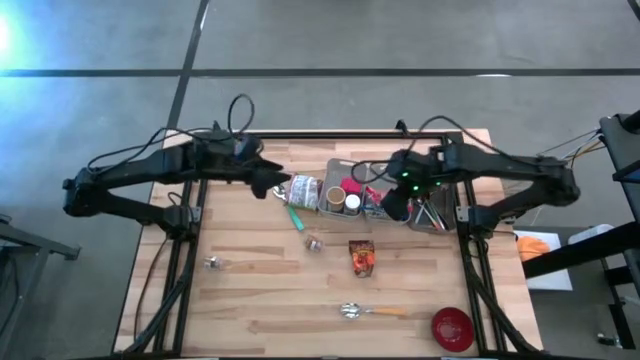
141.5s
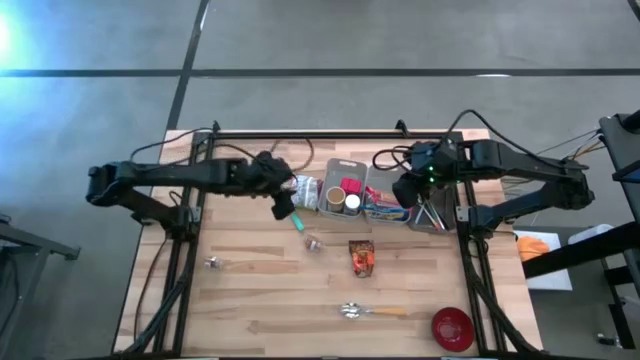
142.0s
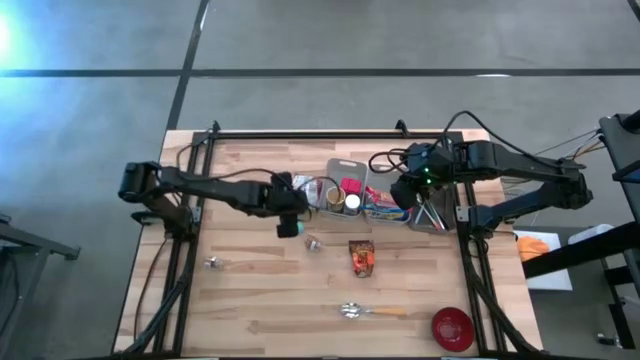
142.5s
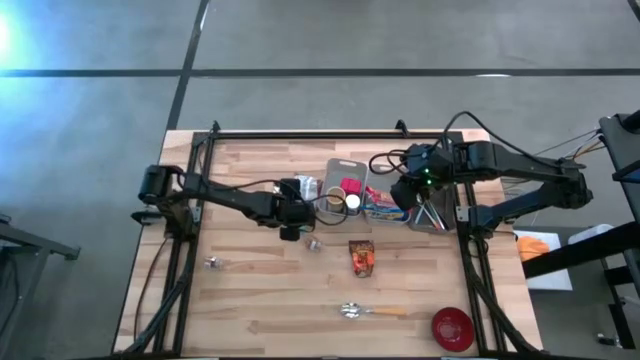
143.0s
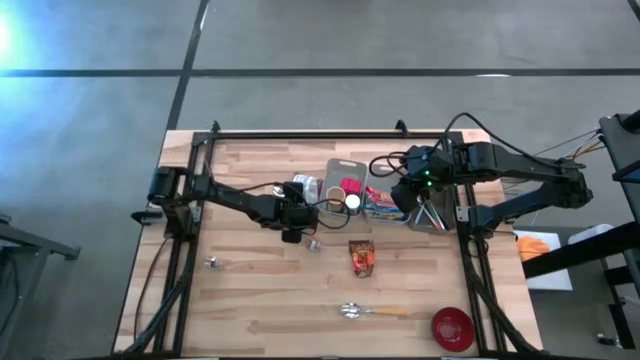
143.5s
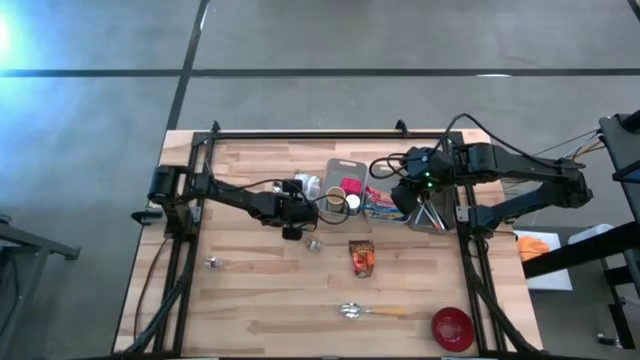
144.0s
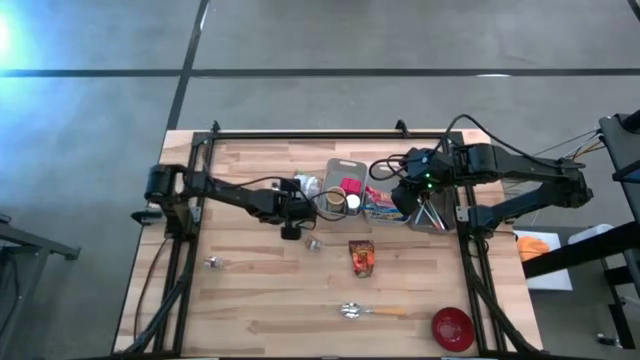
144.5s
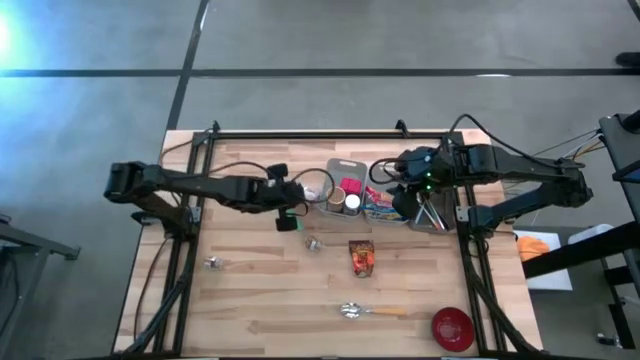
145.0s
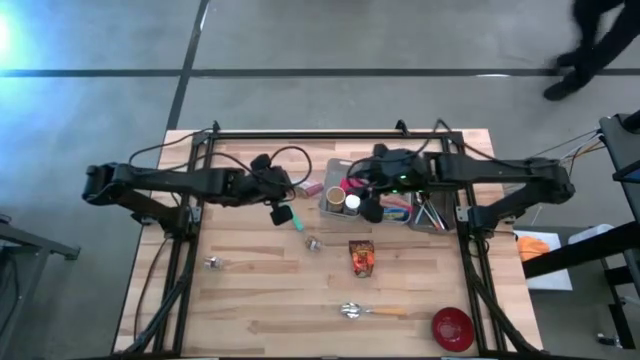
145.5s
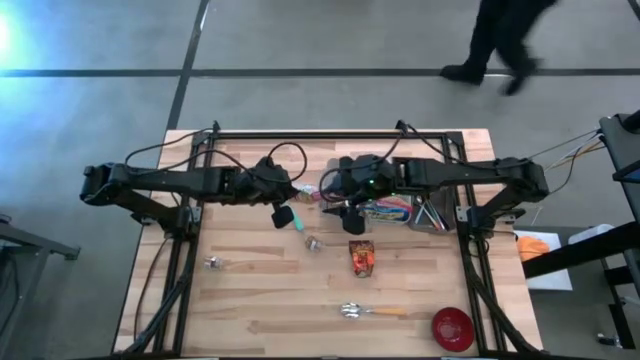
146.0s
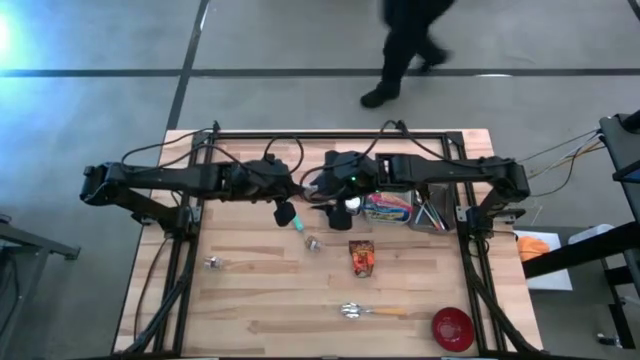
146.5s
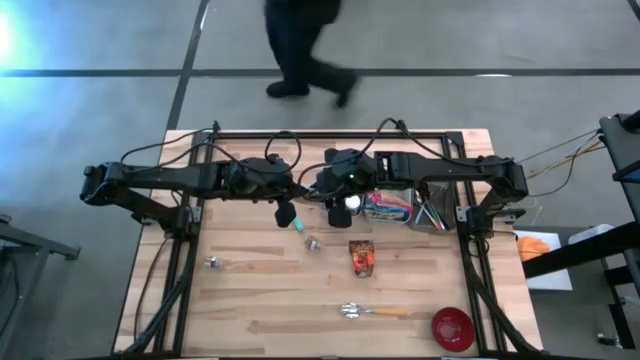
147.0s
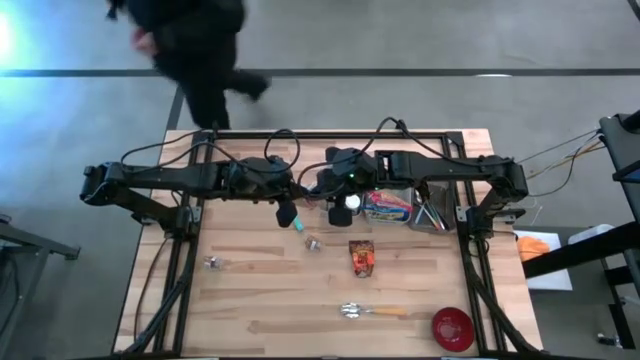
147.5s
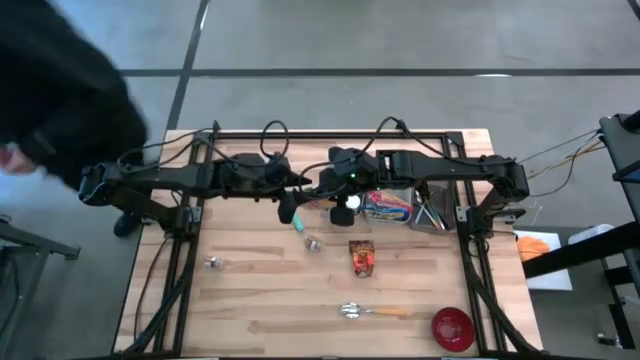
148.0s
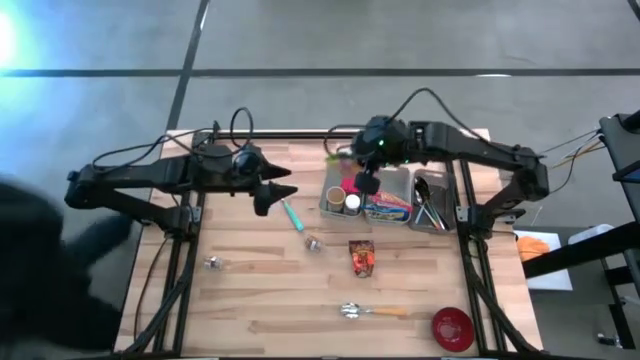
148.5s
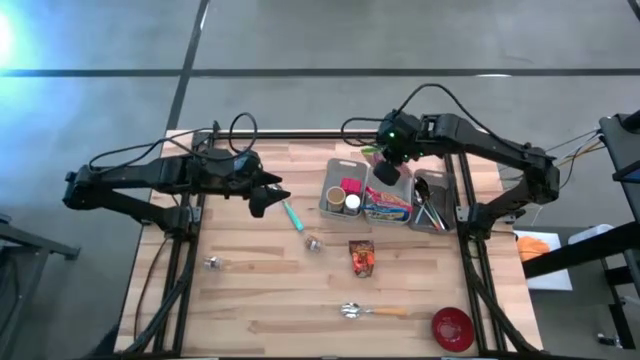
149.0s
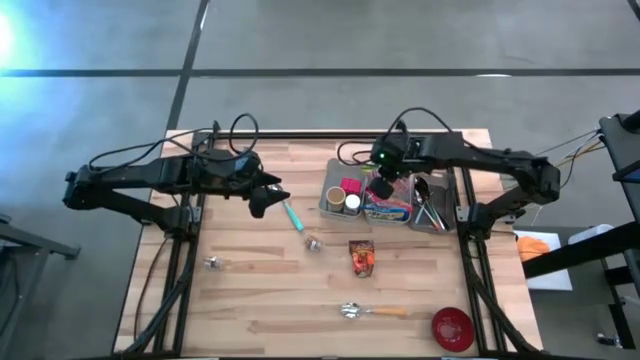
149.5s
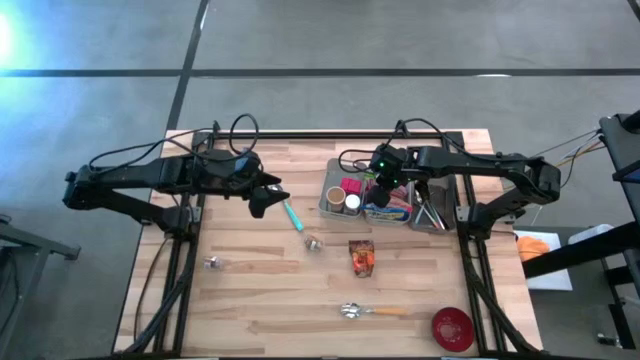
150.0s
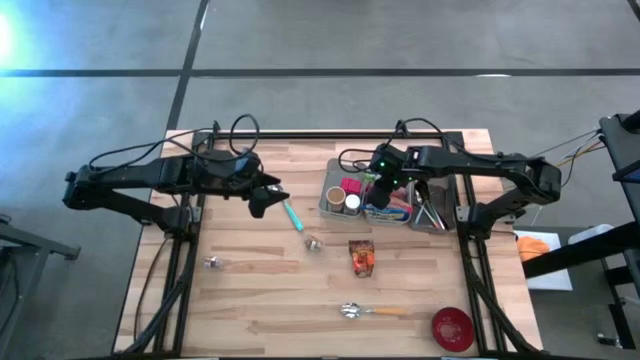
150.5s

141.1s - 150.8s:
Put the green noodle pack into the right gray bin

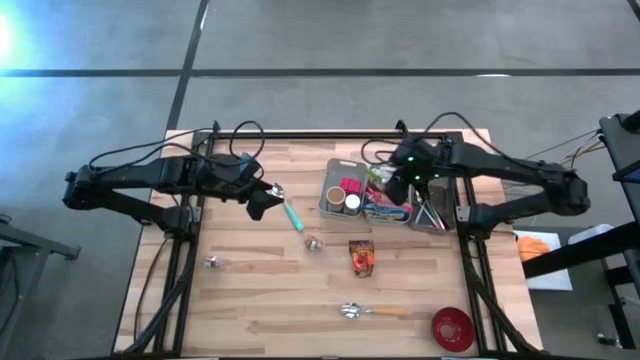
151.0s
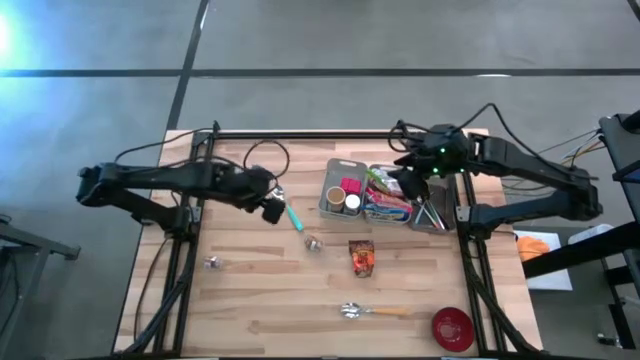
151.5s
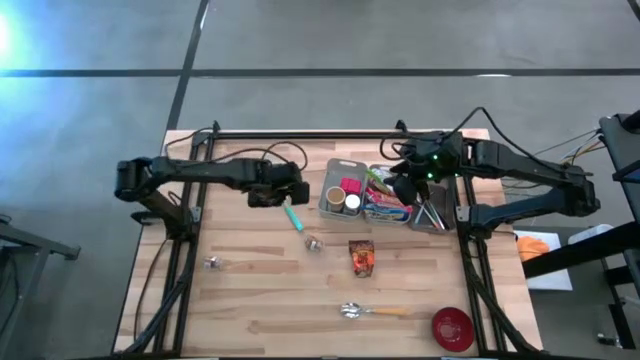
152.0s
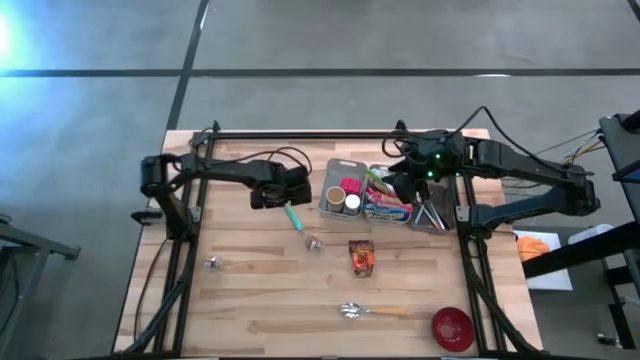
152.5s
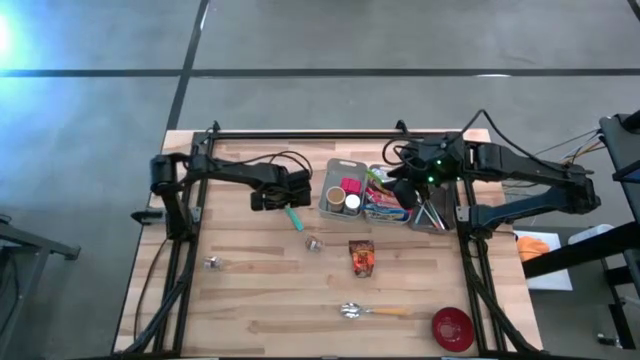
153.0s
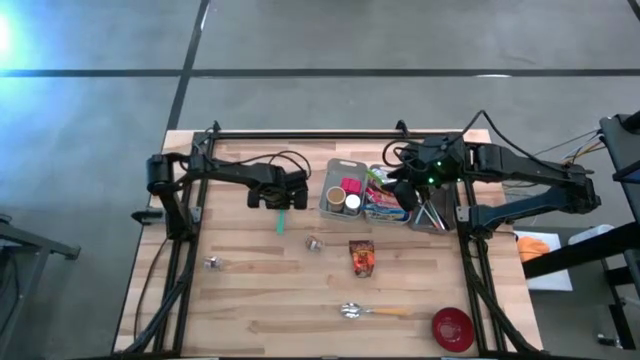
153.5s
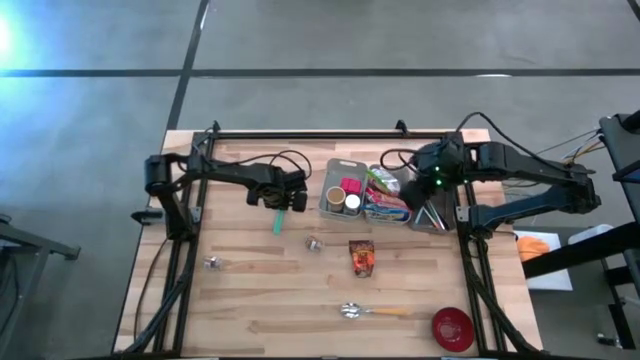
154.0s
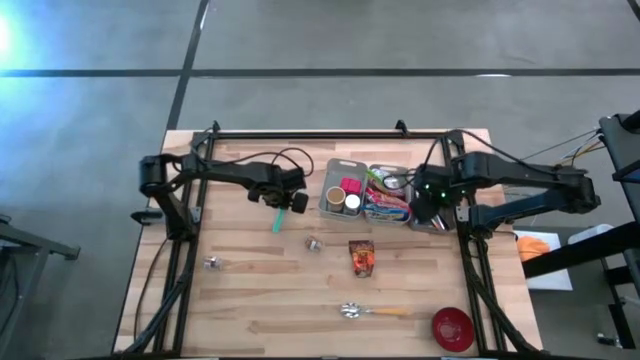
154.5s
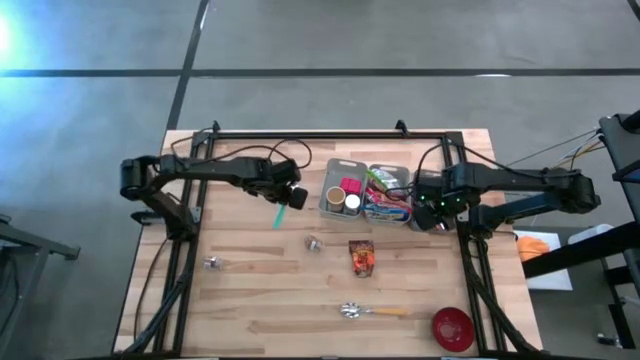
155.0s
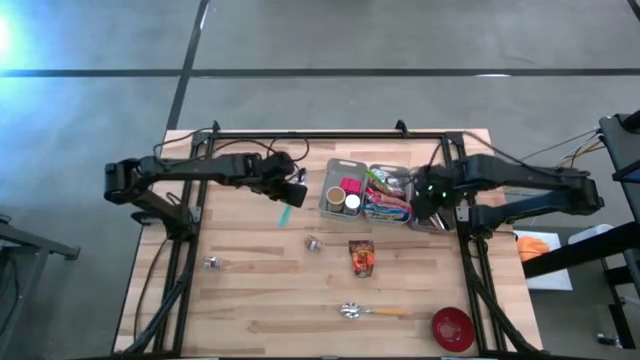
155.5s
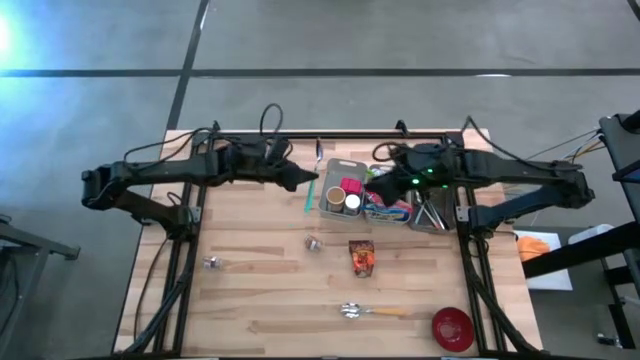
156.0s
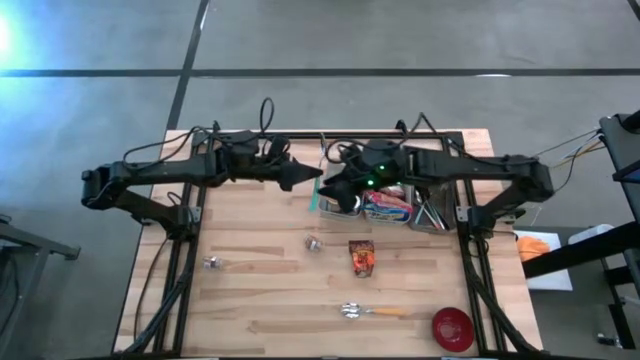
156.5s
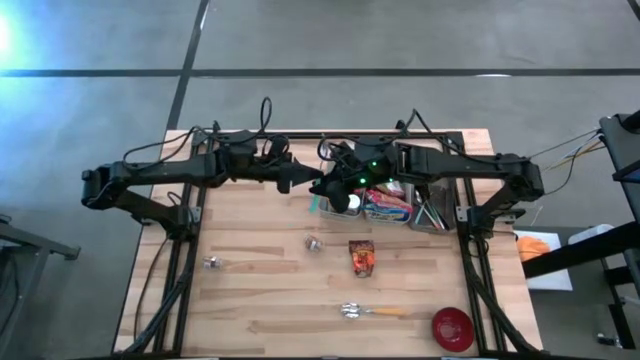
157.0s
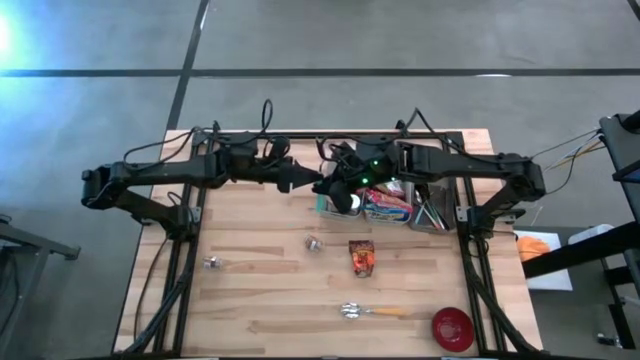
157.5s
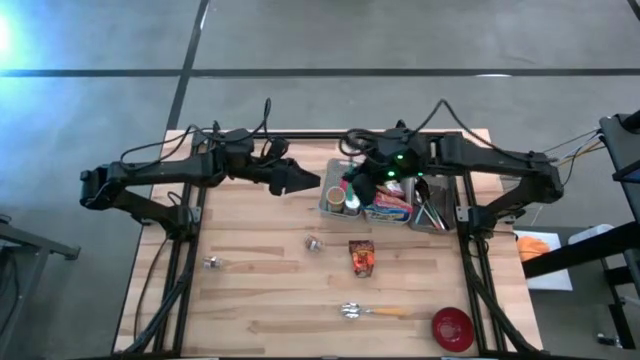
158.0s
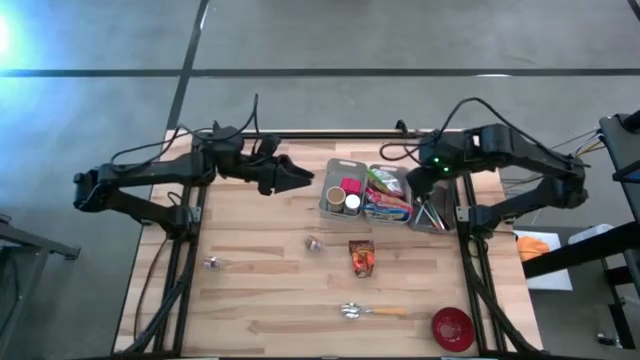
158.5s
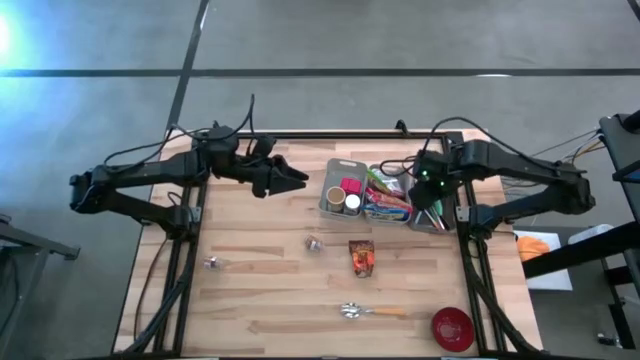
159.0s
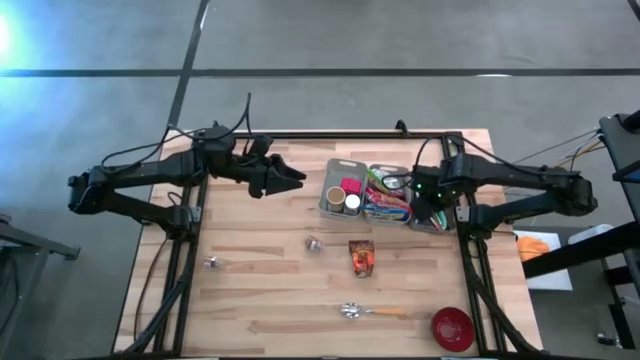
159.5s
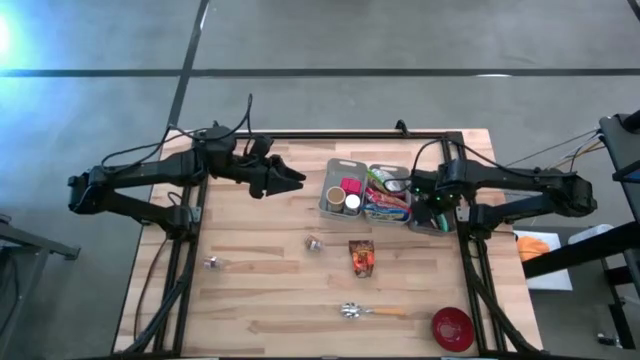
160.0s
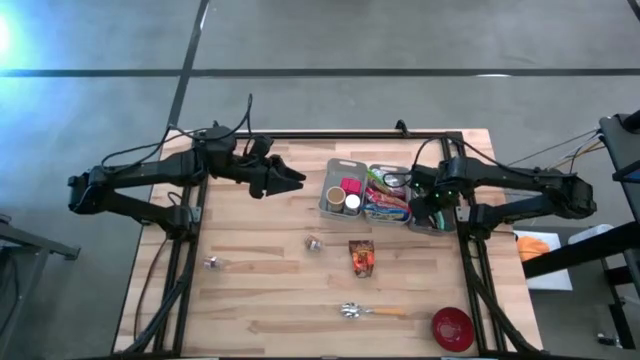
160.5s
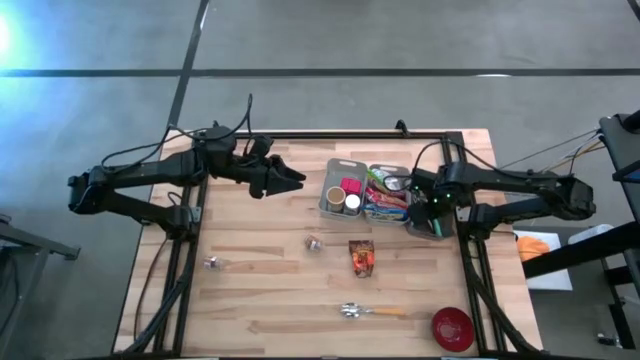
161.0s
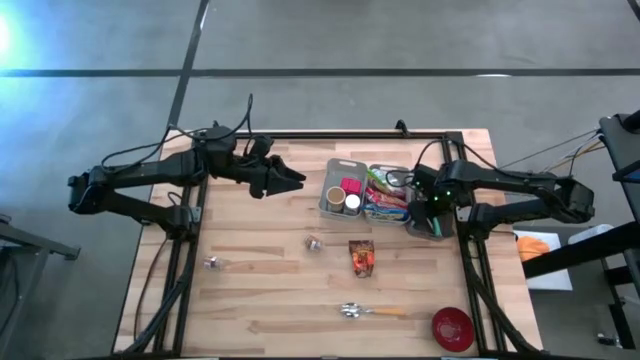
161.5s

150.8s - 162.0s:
Put the light green spoon into the black bin
